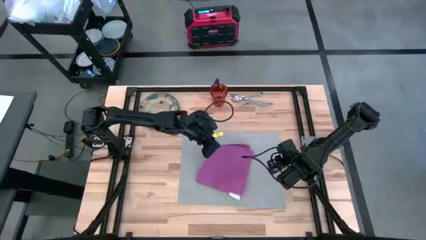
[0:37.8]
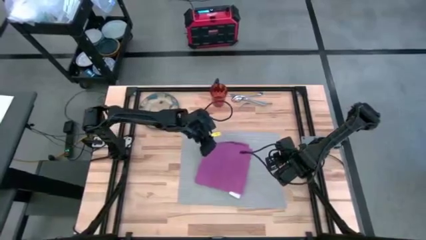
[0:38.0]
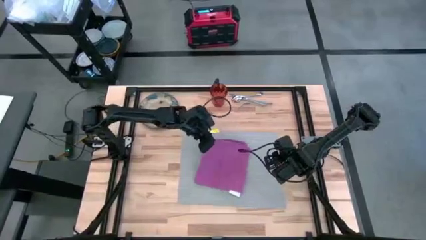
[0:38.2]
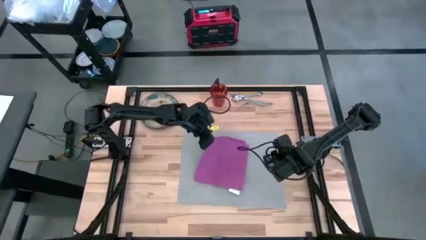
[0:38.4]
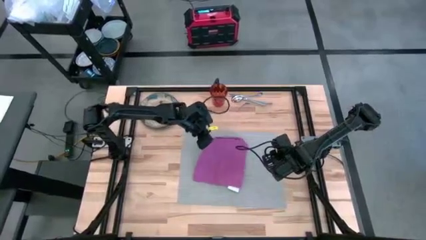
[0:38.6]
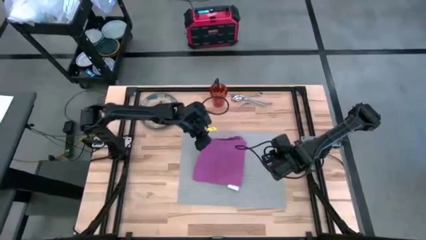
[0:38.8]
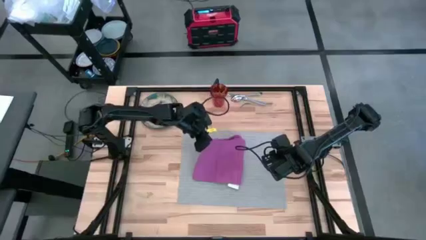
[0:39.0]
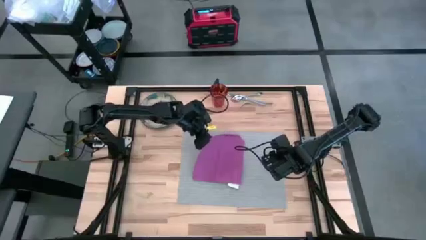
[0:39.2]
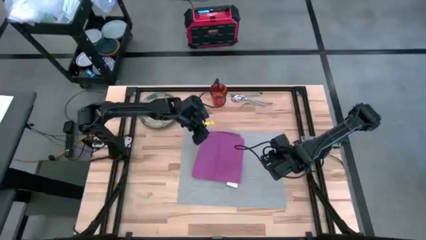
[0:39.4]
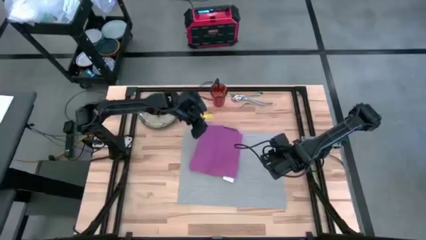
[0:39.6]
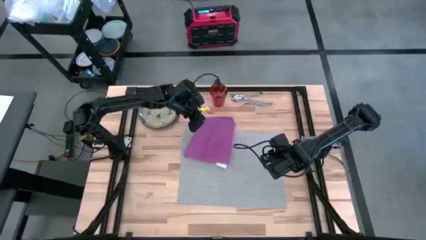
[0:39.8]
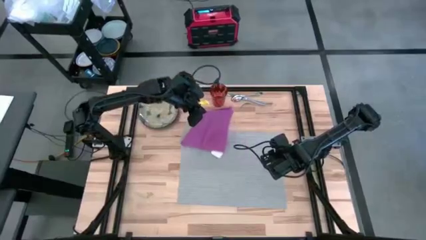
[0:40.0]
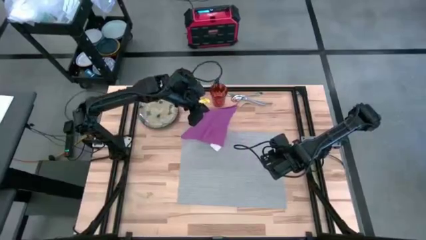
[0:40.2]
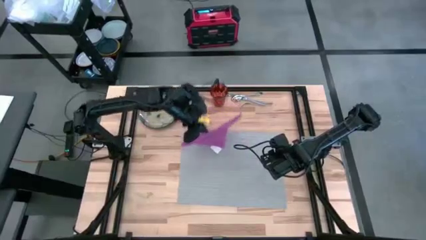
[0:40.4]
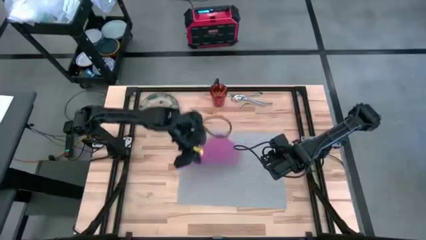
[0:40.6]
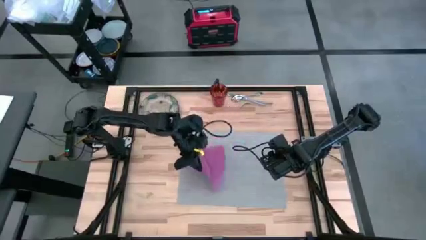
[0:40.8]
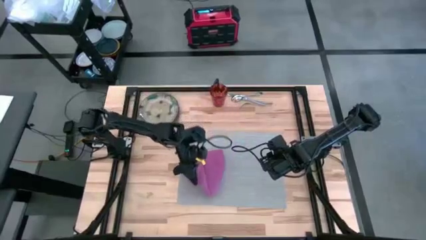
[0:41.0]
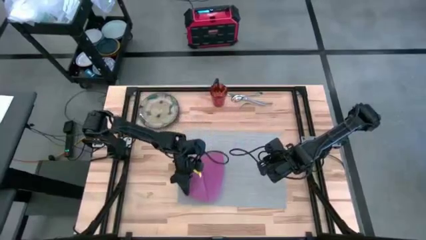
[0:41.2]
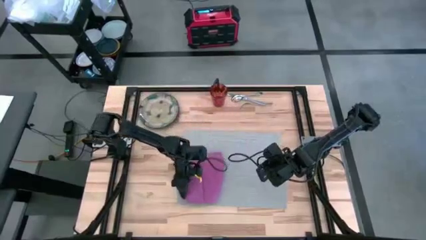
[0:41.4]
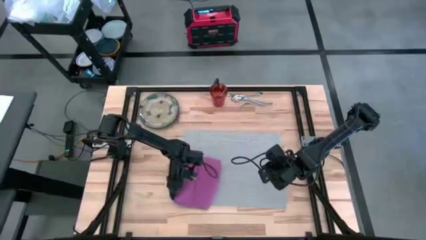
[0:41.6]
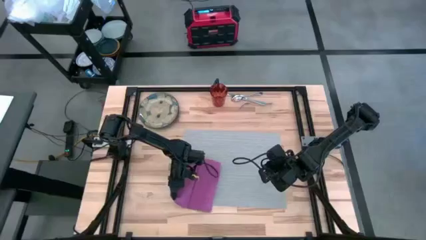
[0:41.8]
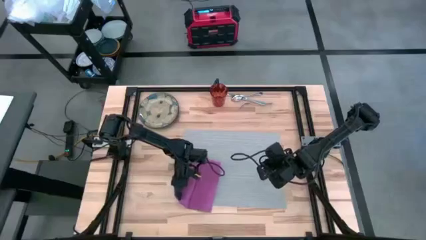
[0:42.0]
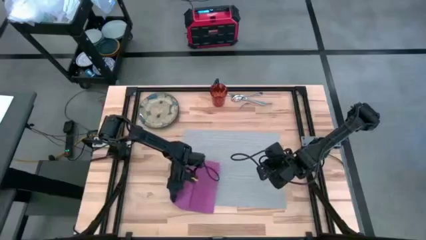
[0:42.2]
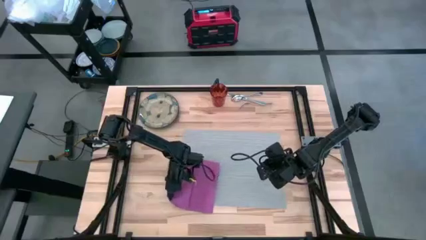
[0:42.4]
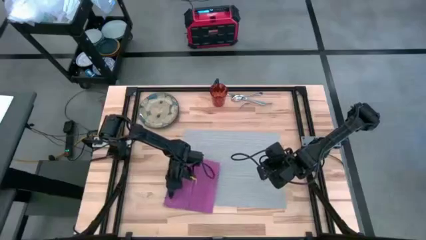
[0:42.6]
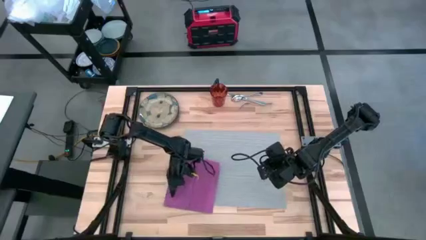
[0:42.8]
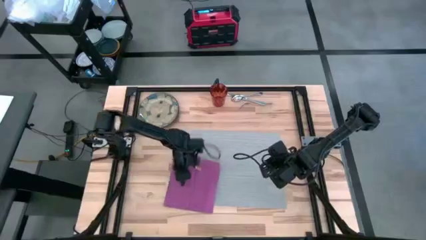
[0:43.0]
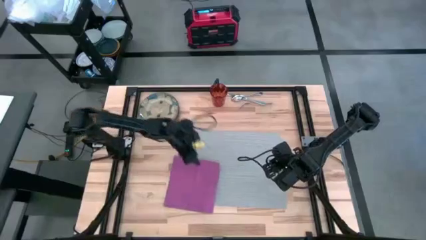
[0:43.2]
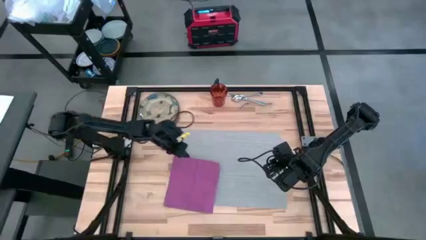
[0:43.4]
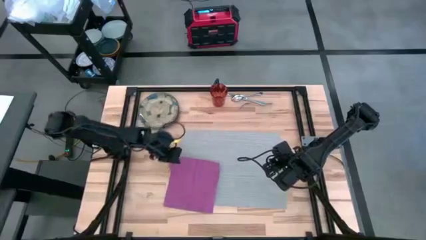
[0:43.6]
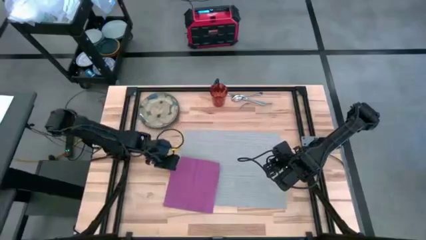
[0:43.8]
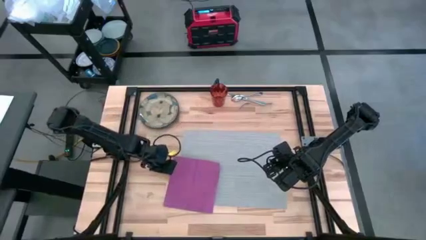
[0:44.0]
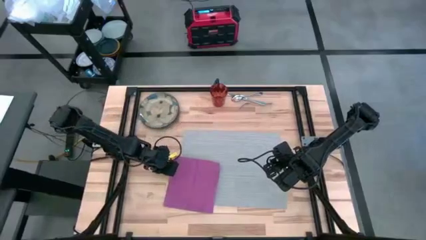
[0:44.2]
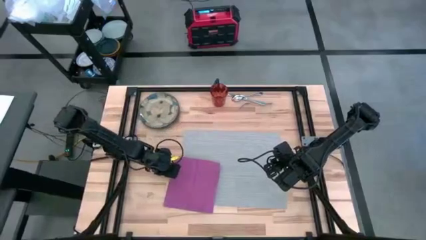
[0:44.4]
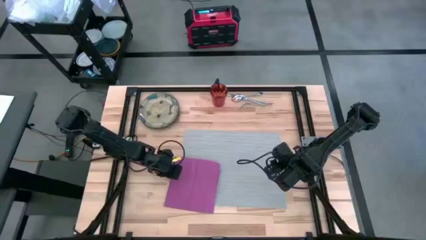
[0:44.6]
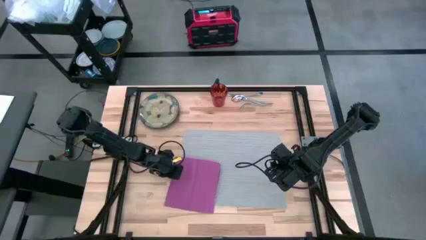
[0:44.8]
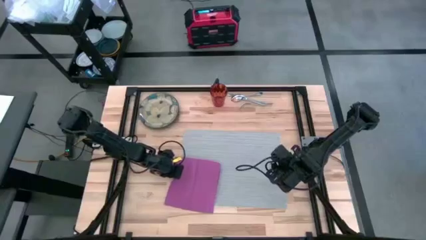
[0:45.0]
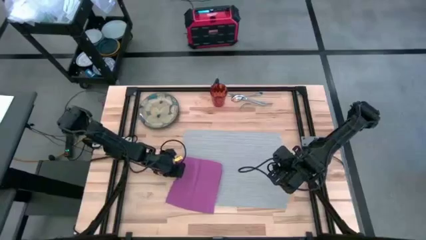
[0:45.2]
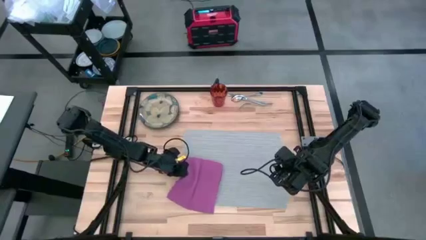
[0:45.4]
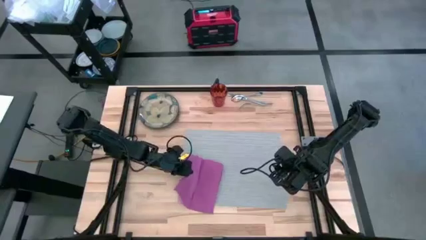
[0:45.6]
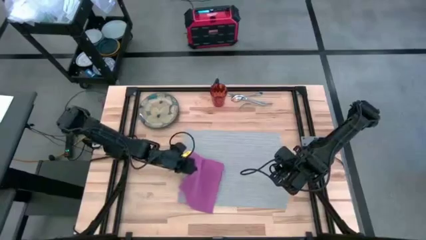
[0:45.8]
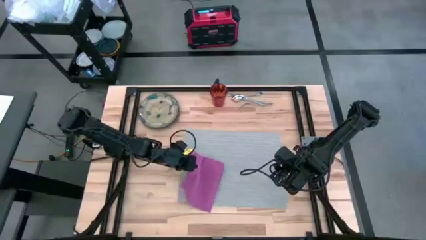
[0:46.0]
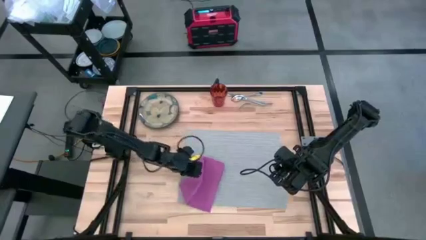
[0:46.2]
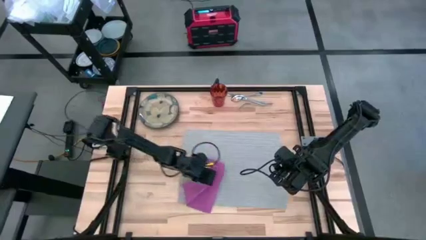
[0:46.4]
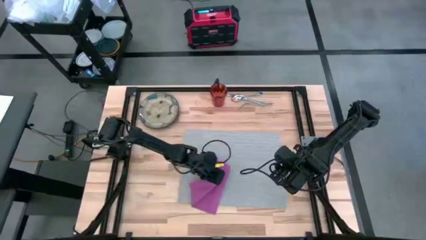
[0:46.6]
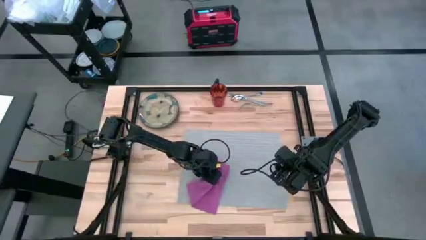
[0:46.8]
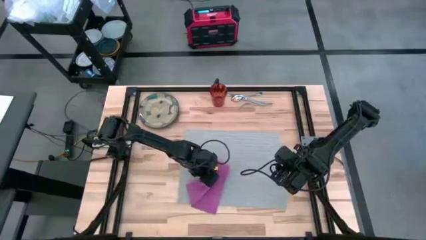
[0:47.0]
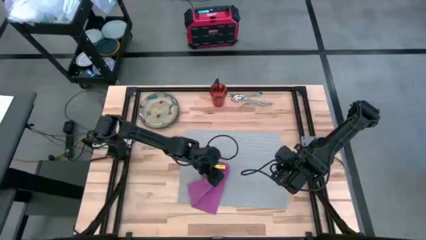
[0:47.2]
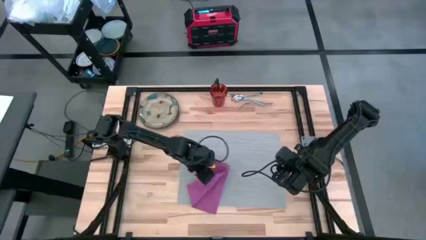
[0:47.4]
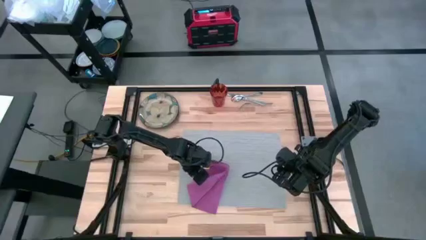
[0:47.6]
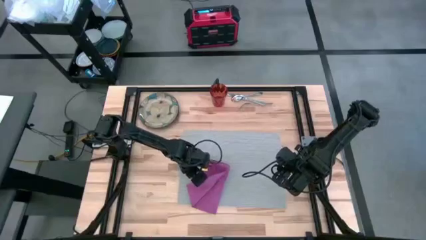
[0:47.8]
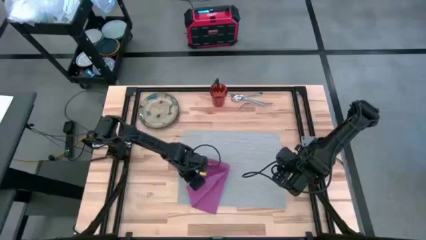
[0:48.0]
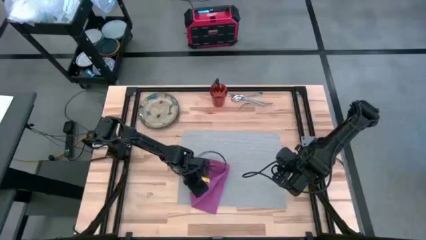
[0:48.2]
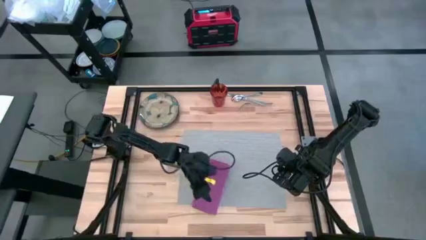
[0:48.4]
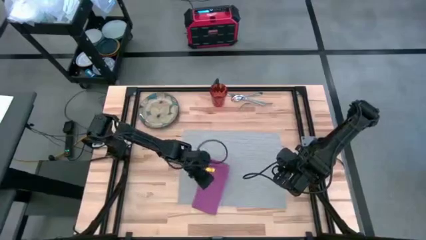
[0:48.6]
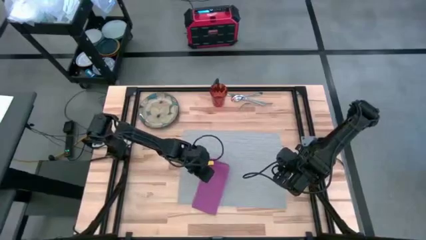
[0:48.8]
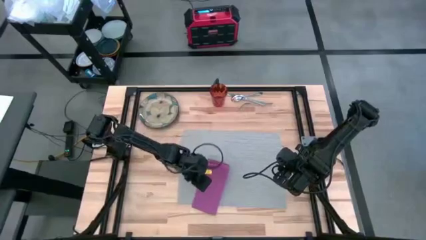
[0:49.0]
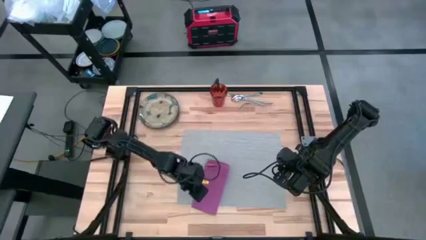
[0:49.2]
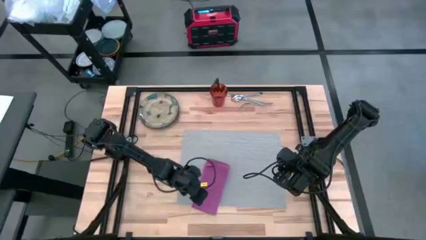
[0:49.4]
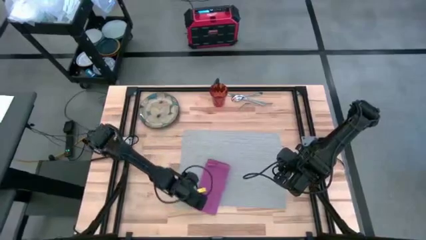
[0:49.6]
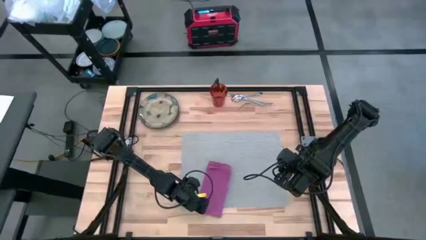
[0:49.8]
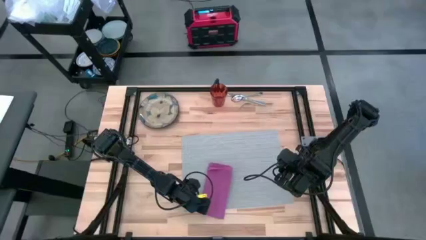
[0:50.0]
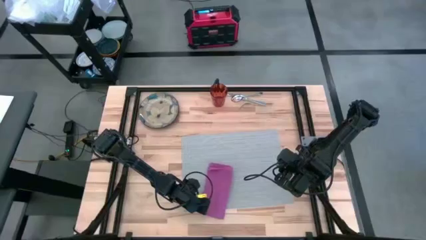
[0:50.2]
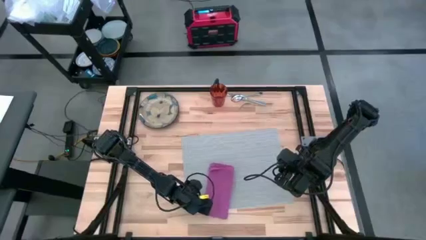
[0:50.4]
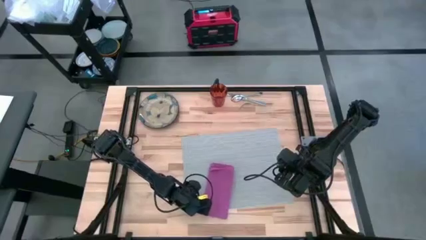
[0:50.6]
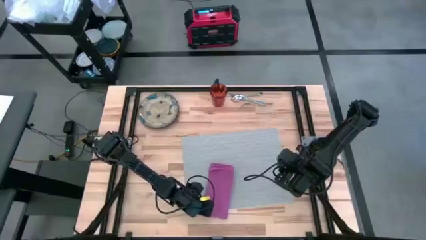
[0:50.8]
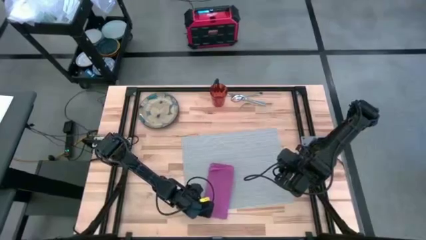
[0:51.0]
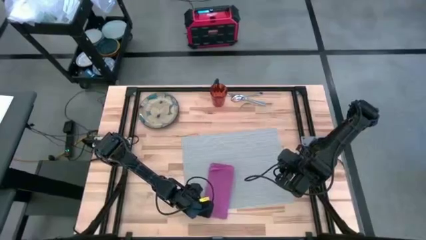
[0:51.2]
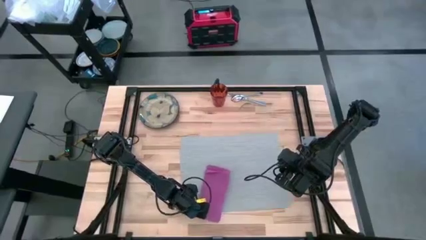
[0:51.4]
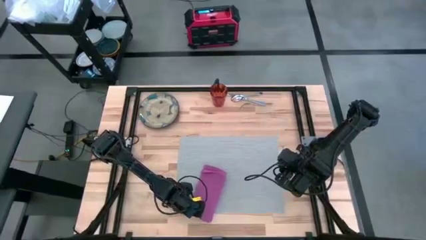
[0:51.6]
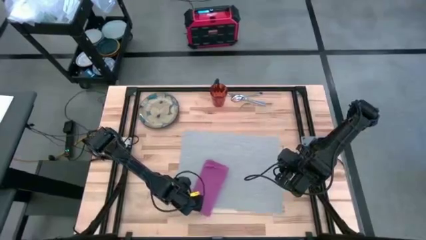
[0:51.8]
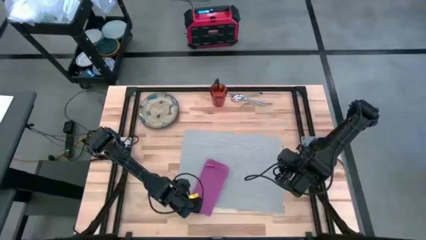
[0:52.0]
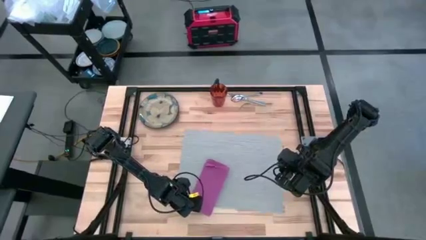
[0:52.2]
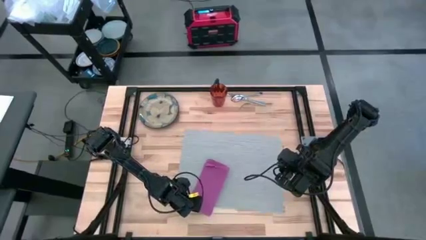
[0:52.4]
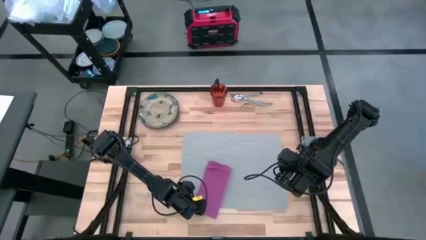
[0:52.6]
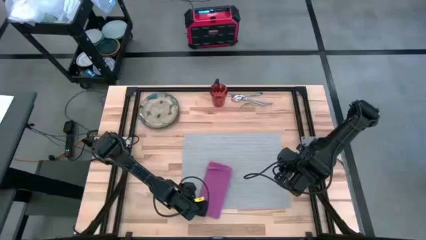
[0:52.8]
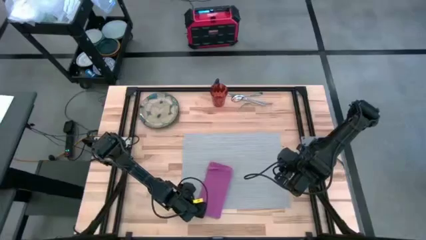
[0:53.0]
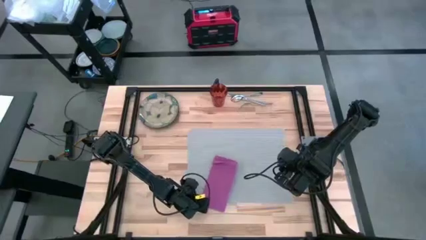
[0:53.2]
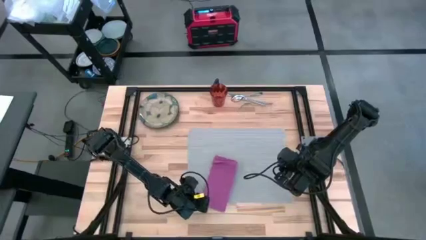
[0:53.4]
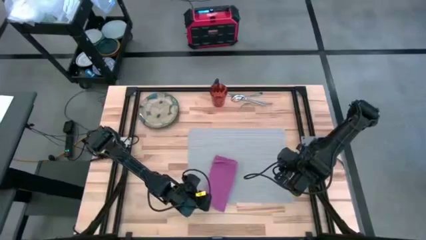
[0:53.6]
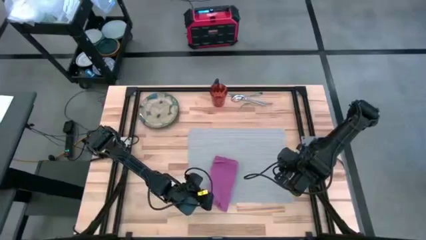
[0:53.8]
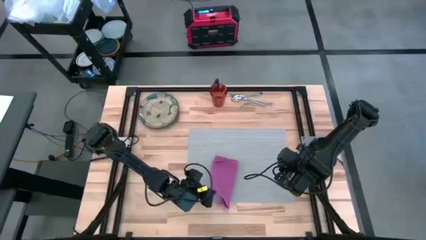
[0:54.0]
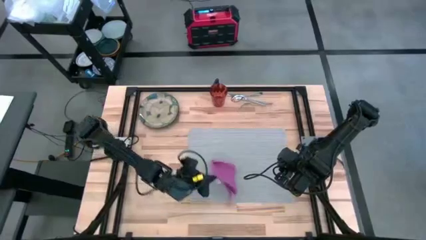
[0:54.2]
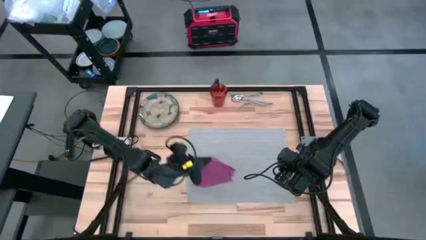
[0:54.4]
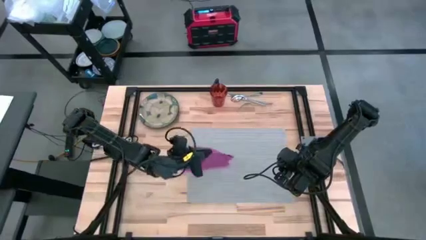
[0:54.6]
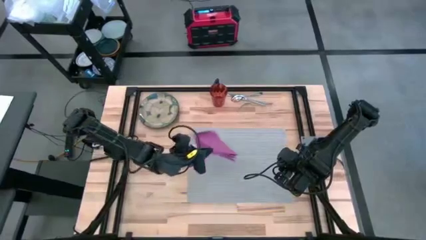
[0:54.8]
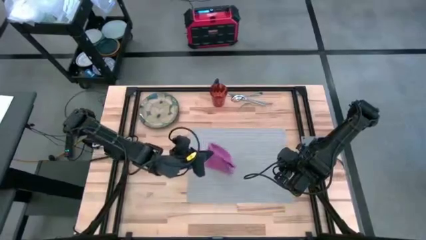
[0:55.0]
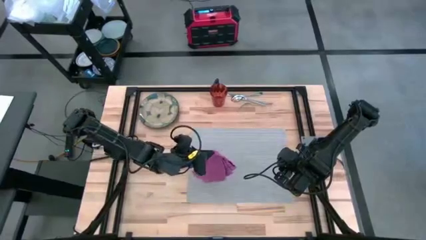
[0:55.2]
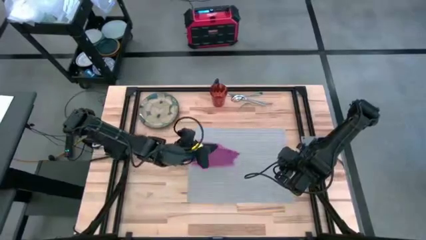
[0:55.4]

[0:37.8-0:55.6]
Task: Set table place
Fold the pink table napkin
